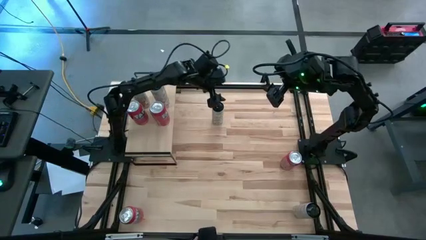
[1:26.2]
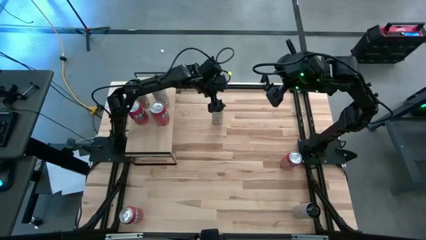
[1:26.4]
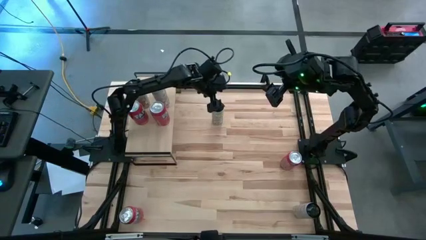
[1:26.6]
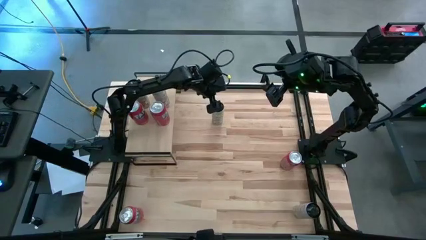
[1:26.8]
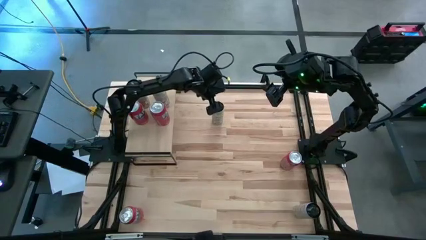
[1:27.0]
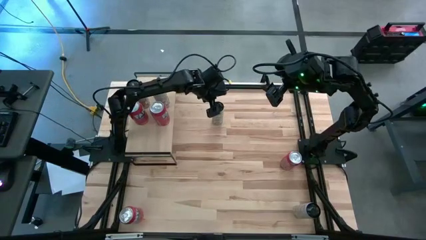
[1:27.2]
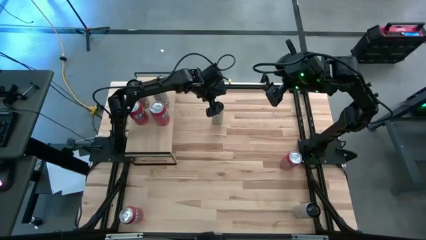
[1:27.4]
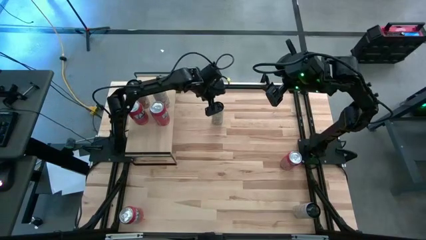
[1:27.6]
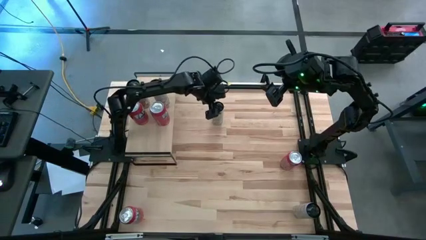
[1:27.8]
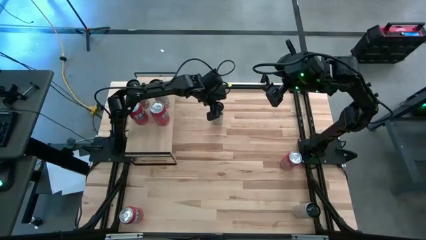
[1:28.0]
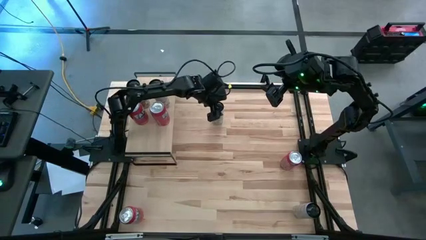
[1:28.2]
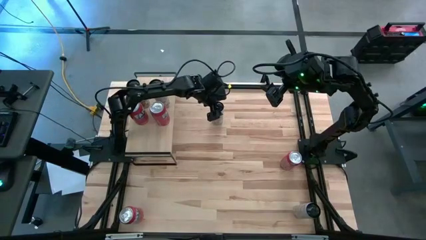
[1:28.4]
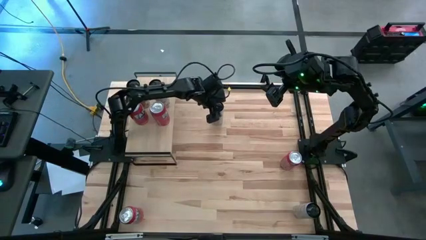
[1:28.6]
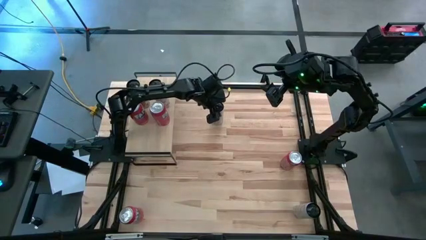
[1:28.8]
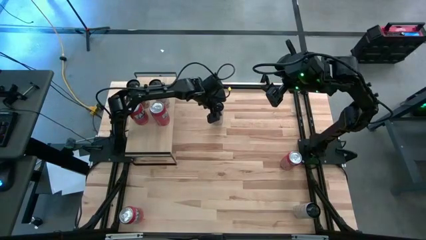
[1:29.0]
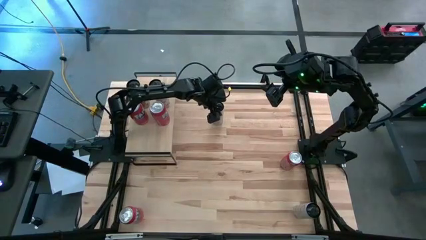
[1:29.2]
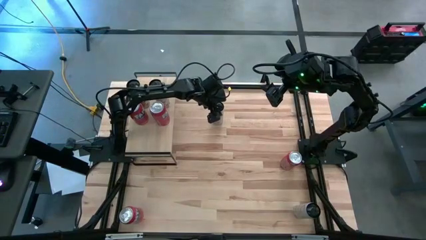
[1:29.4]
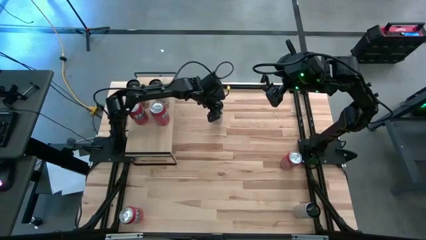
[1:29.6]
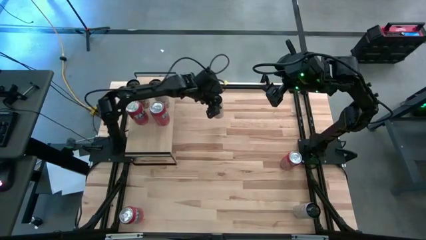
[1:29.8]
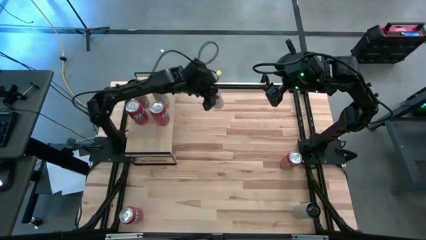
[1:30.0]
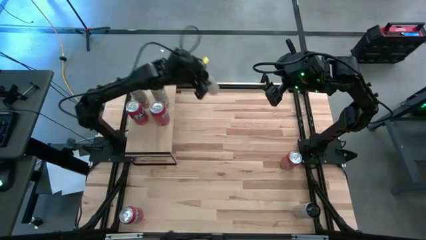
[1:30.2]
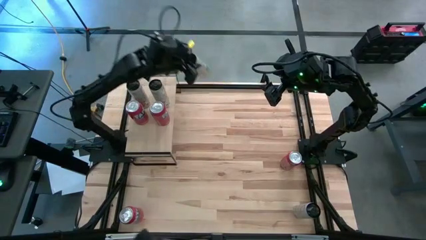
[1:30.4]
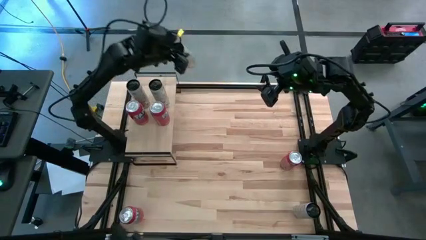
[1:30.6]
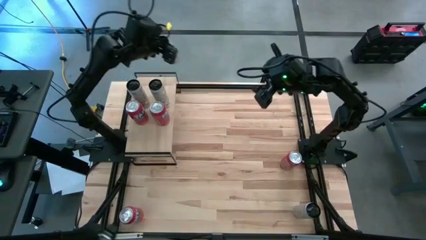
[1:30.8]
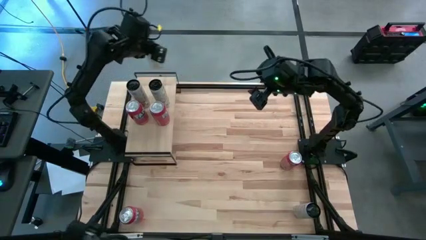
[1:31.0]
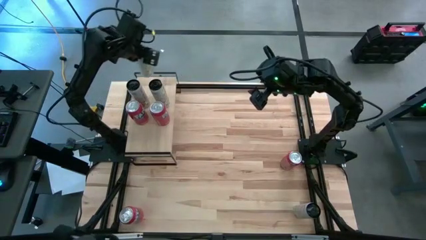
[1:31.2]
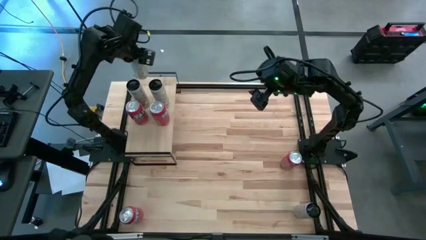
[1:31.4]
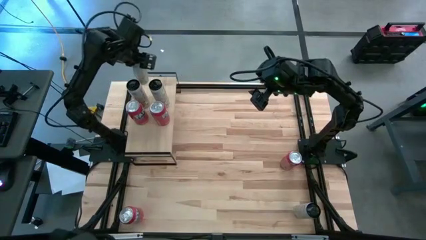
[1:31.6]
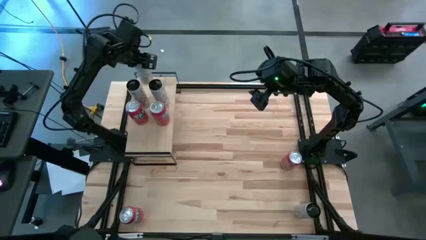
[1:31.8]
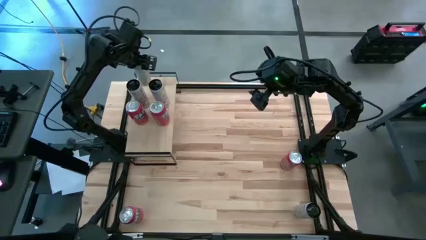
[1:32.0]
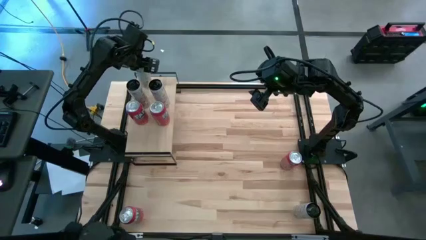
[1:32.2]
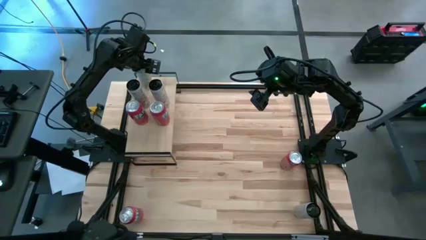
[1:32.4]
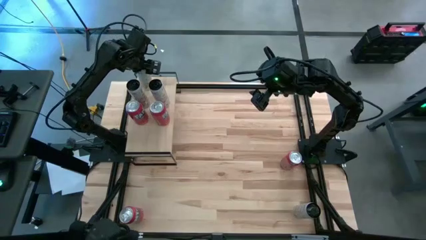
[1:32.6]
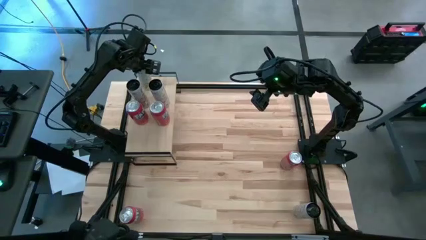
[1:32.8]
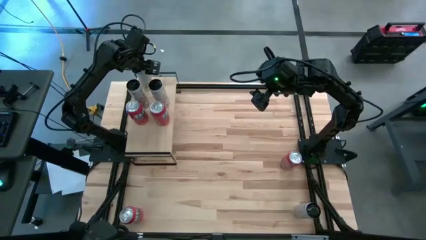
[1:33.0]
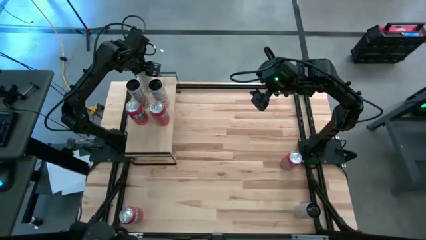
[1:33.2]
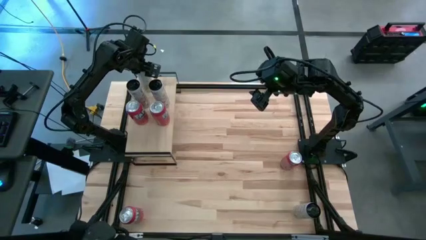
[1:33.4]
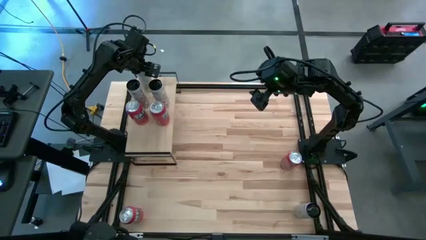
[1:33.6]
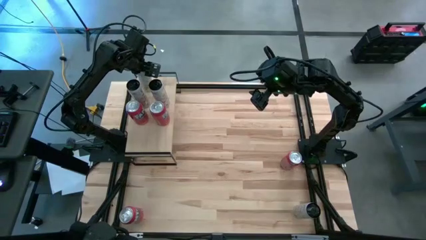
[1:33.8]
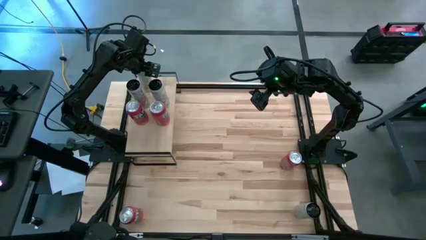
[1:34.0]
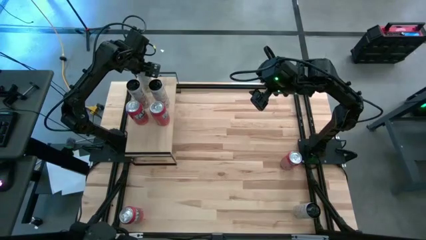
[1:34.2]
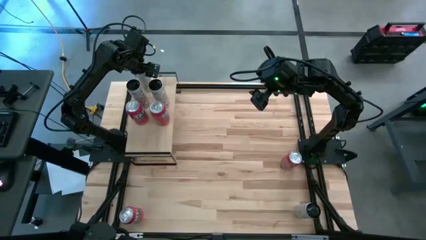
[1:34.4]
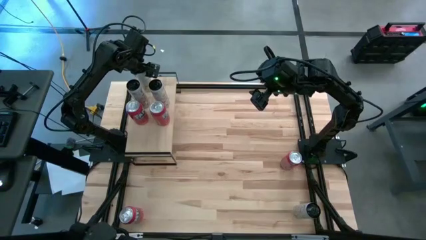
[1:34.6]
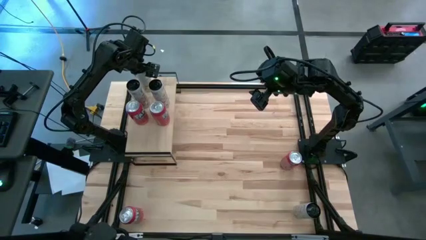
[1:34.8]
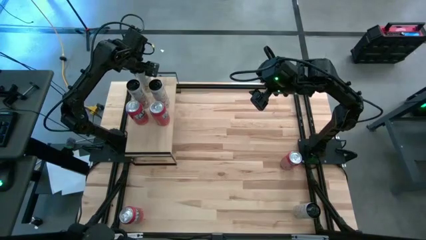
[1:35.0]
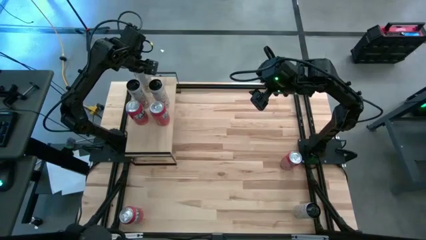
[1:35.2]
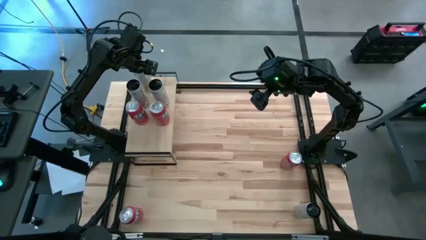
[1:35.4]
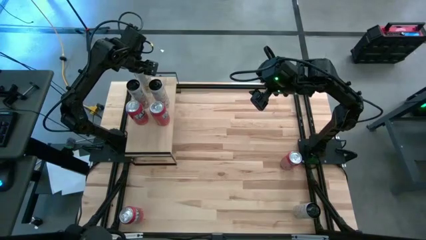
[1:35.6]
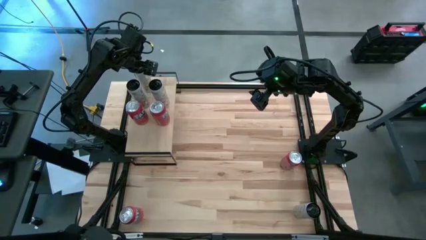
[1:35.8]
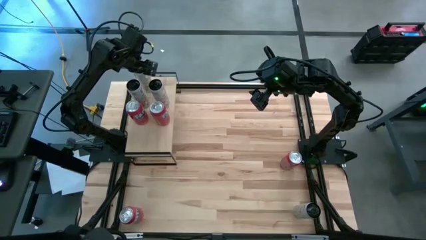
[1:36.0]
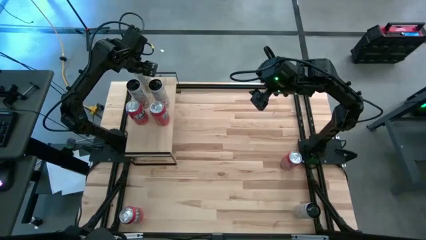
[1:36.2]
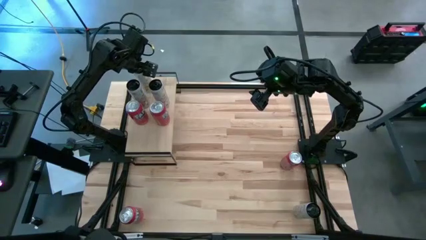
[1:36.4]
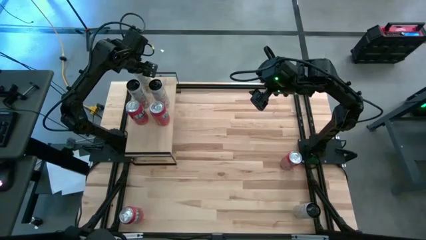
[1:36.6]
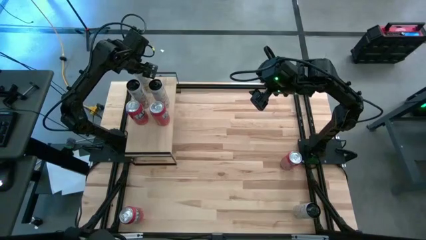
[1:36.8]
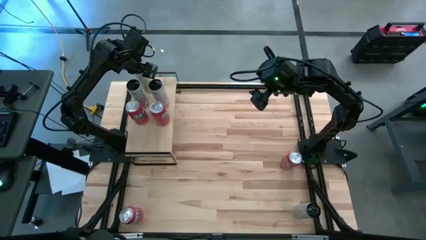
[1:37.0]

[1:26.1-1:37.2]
Task: Place canned beverage on shelf
Put the top white yellow soda can on the shelf
